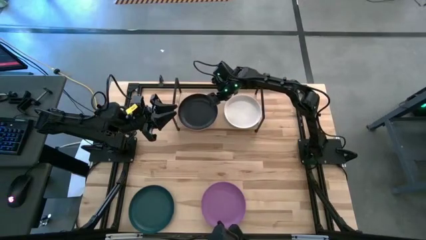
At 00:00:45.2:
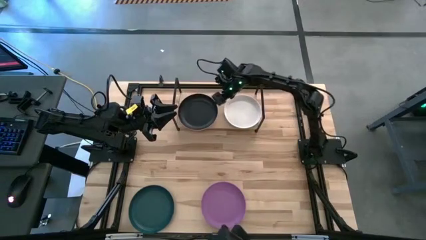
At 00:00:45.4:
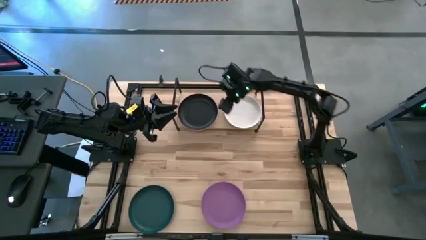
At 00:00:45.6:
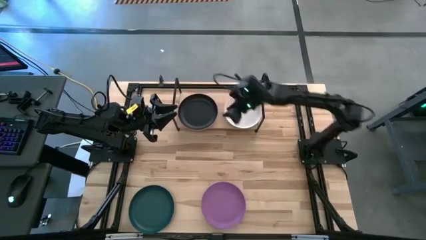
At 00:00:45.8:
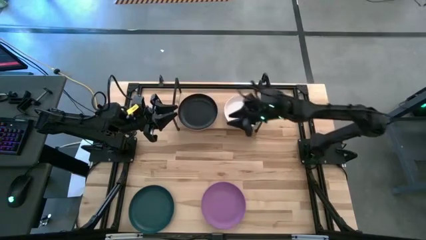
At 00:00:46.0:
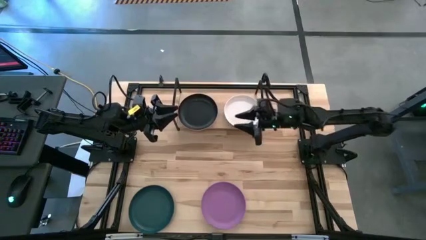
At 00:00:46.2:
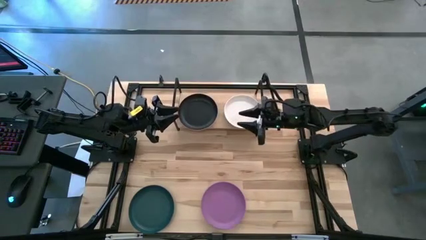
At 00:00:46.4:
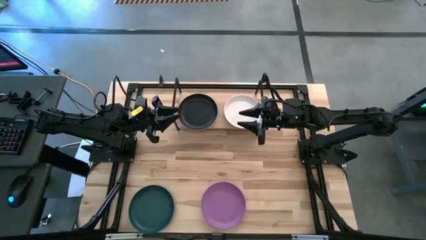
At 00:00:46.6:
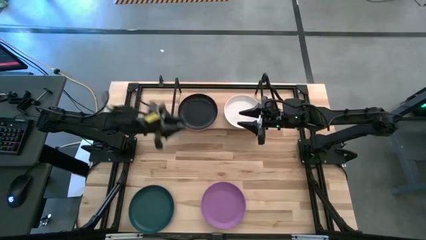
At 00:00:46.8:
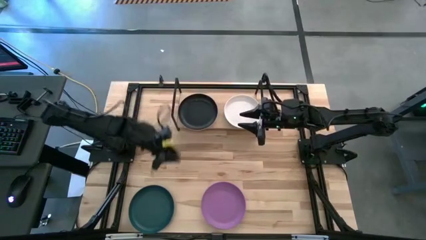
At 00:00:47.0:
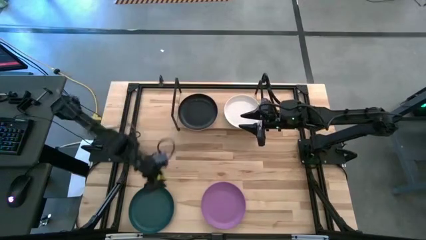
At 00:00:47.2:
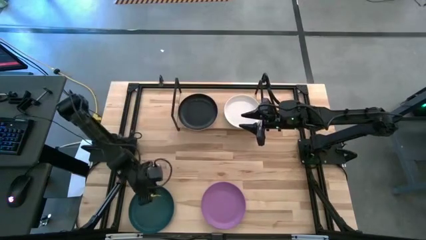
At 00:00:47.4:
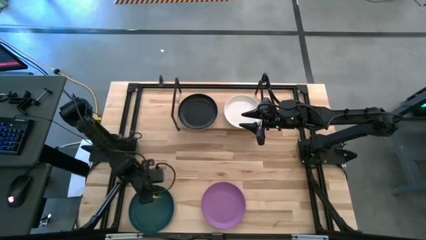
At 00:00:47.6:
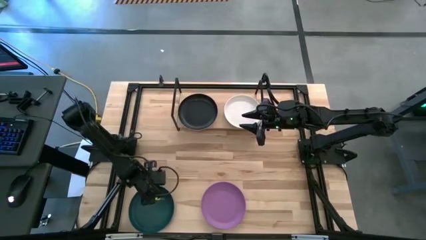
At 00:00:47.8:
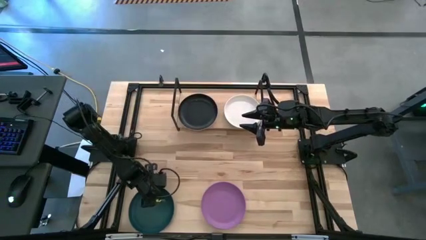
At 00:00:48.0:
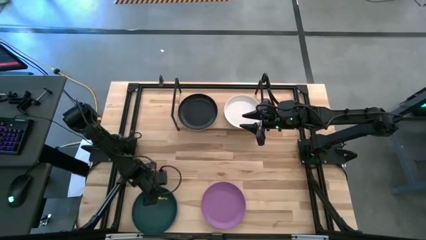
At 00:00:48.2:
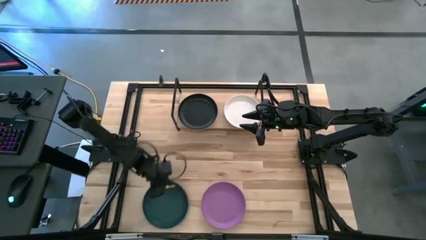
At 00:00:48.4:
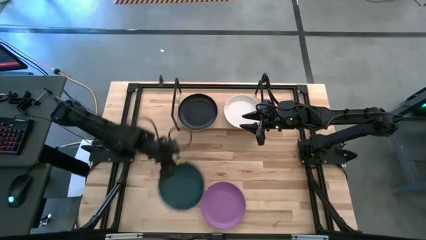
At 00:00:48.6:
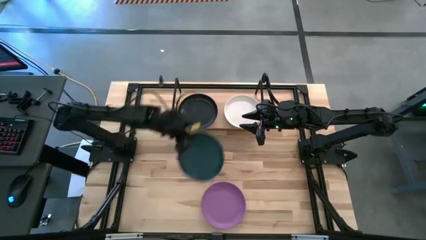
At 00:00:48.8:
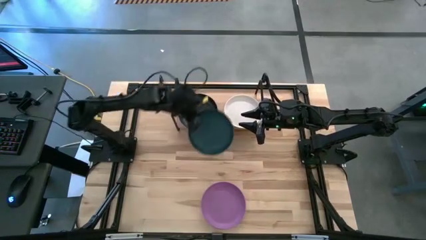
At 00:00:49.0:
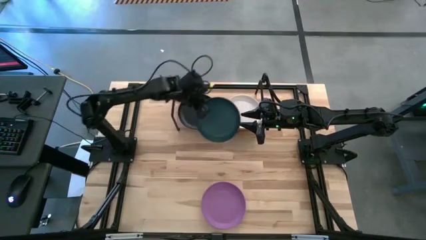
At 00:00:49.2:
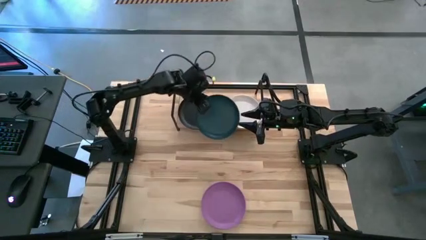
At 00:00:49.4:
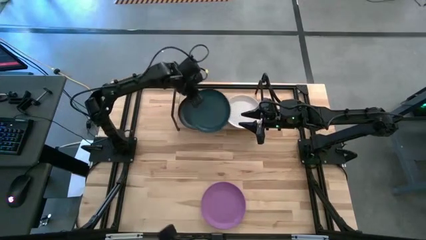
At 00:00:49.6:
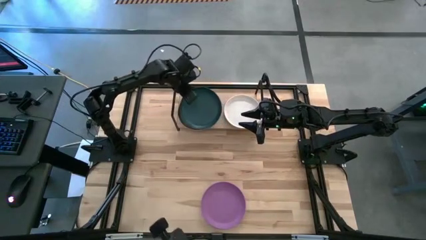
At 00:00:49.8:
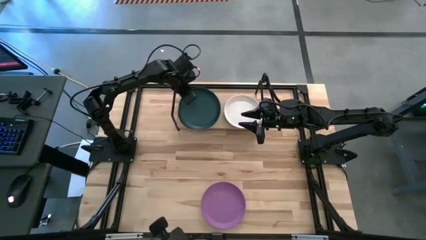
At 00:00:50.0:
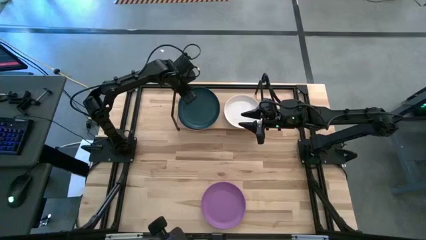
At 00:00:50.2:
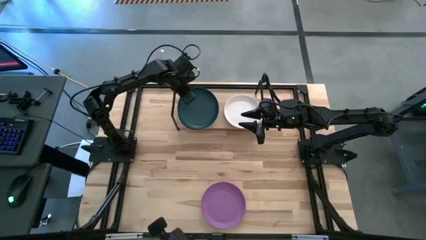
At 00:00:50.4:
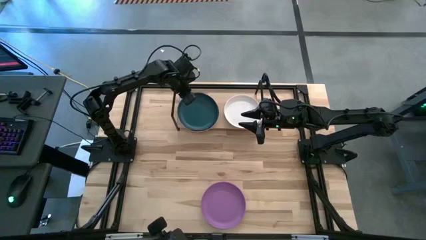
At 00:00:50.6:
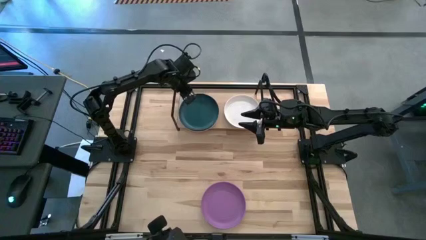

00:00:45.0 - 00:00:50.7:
Task: Place and stack plates onto a shelf
Stack the green plate on top of the black plate on the shelf

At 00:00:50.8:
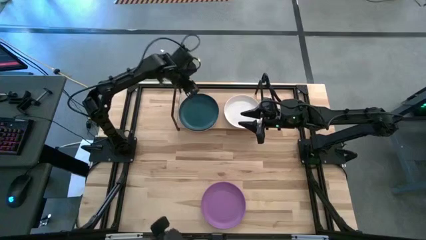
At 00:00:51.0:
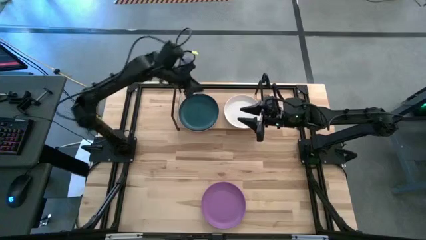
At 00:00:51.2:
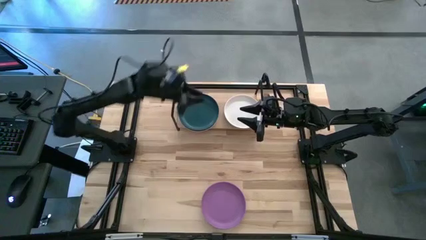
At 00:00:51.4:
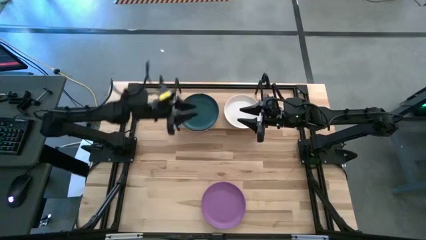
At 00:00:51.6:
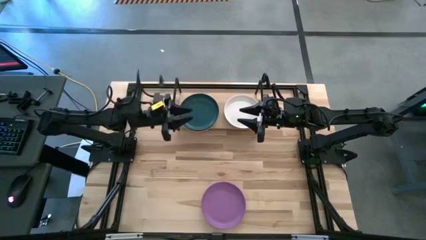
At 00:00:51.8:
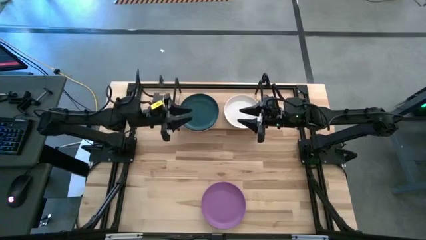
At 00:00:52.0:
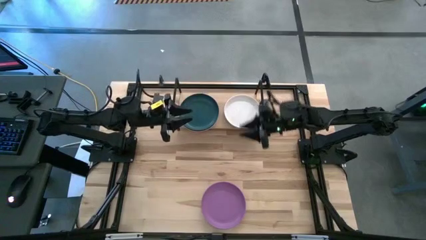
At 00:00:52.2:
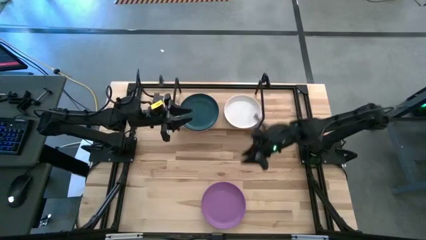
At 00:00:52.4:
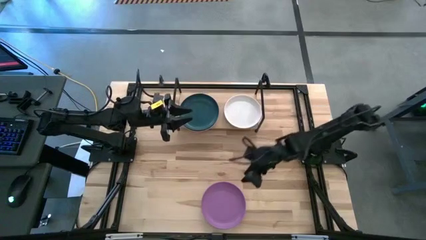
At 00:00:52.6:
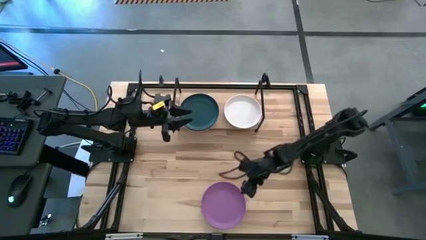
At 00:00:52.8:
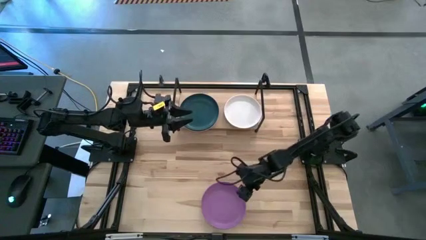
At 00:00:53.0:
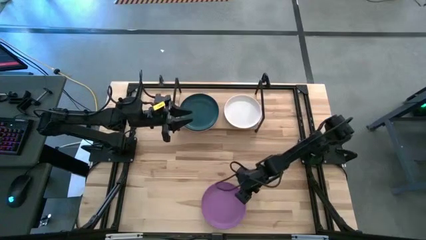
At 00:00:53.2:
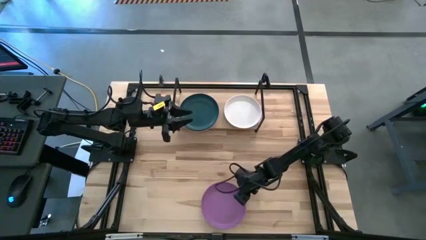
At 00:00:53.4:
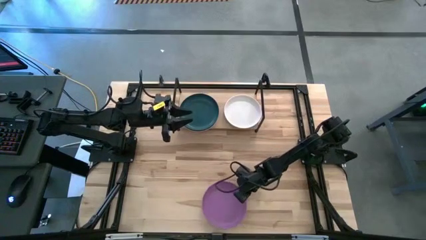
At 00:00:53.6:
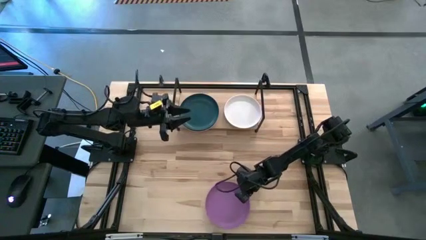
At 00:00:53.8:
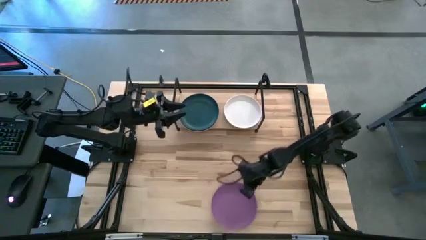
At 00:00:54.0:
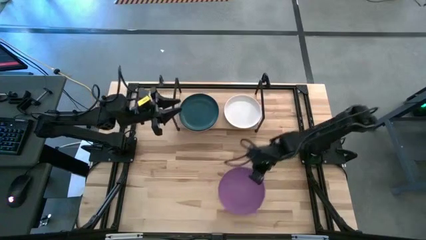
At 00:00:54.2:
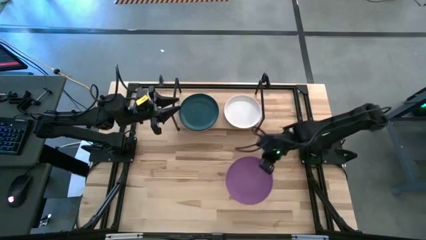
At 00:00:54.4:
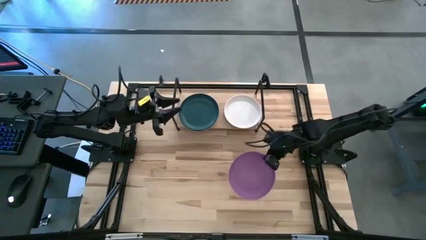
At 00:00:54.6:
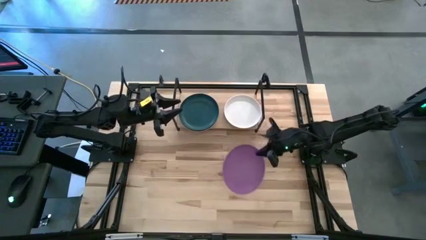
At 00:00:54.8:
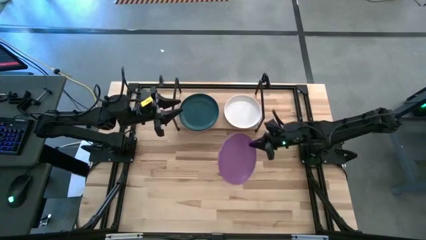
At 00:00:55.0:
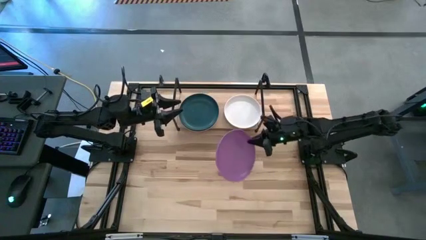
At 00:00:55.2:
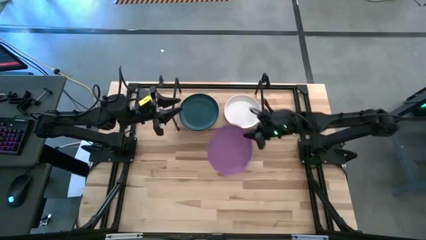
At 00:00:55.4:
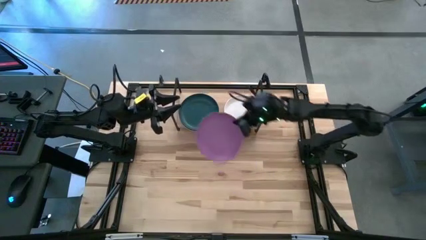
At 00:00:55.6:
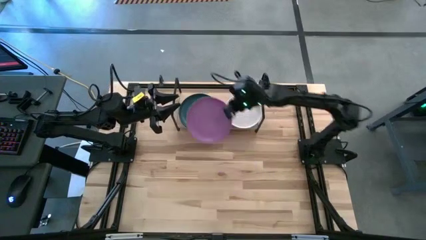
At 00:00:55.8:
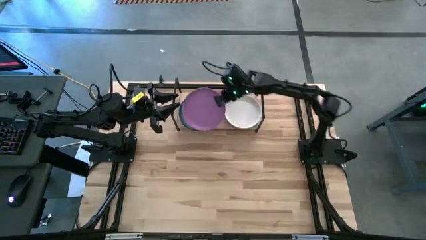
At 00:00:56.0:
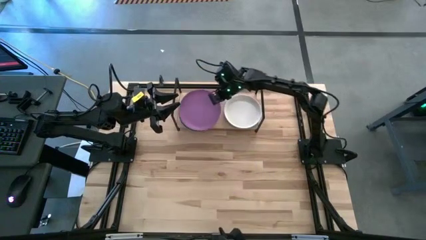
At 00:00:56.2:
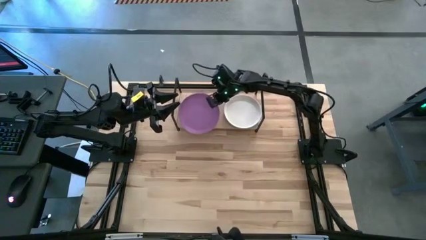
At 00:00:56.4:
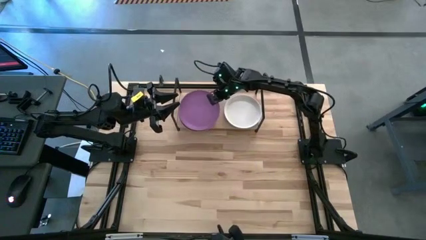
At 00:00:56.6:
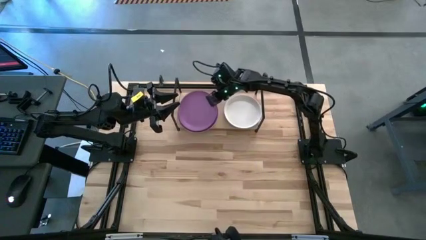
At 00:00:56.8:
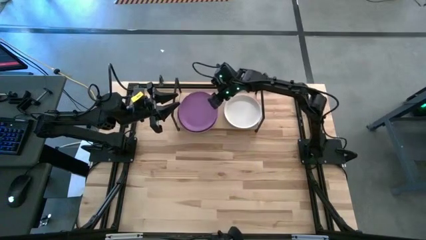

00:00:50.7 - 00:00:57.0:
Stack the purple plate on top of the dark green plate on the shelf

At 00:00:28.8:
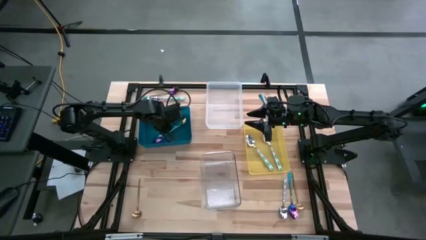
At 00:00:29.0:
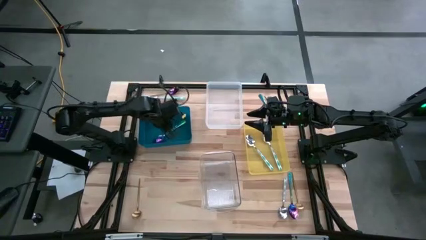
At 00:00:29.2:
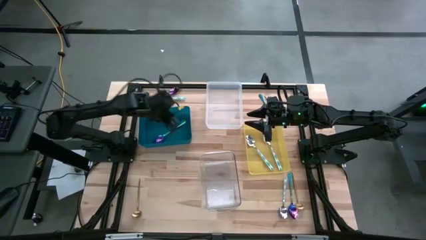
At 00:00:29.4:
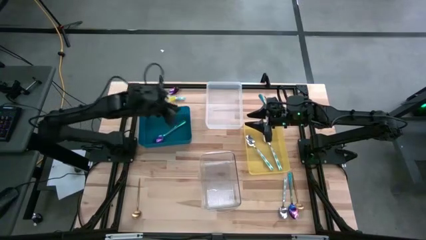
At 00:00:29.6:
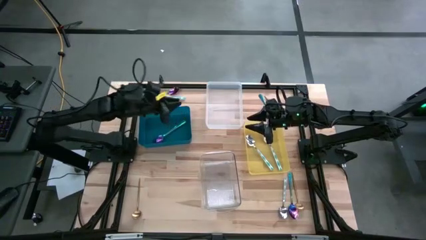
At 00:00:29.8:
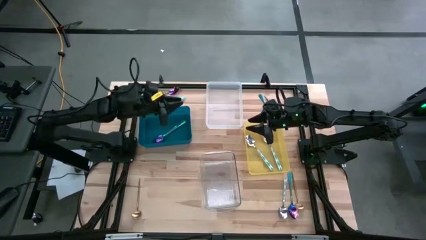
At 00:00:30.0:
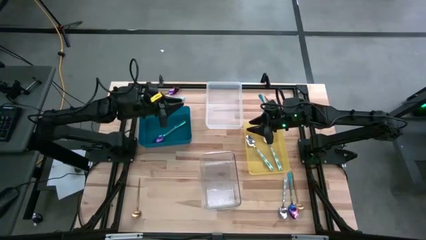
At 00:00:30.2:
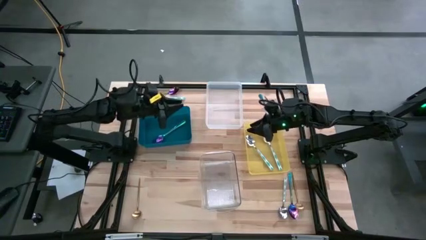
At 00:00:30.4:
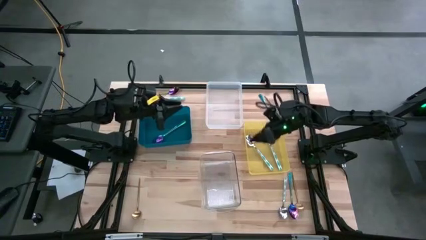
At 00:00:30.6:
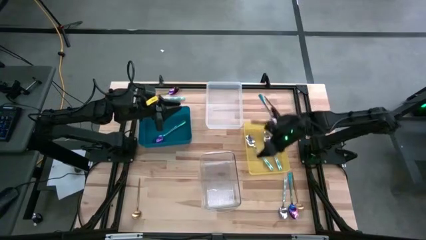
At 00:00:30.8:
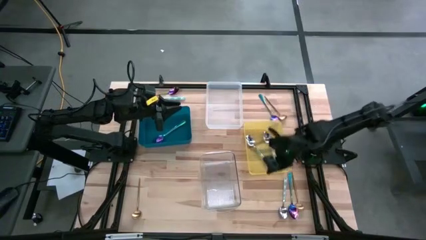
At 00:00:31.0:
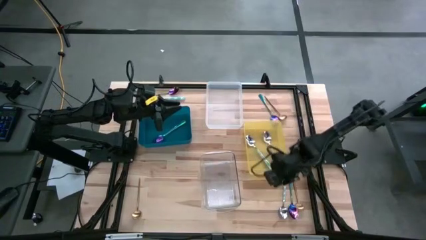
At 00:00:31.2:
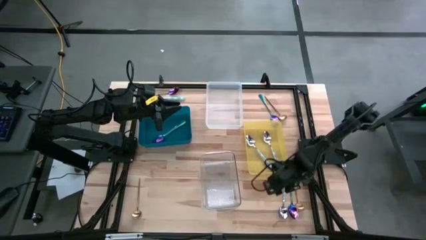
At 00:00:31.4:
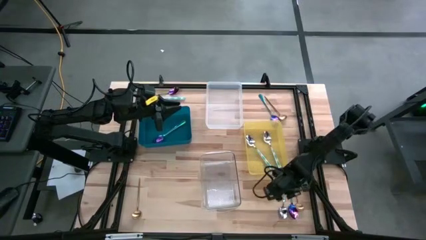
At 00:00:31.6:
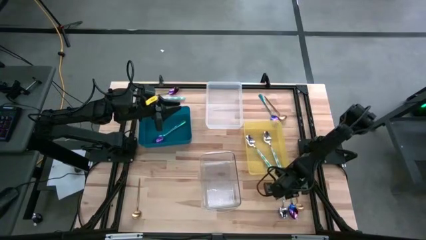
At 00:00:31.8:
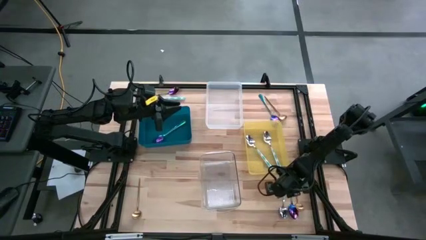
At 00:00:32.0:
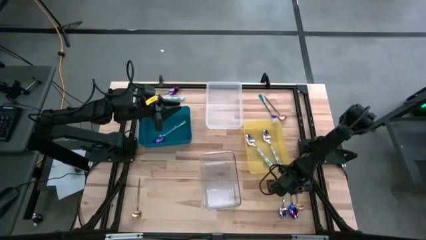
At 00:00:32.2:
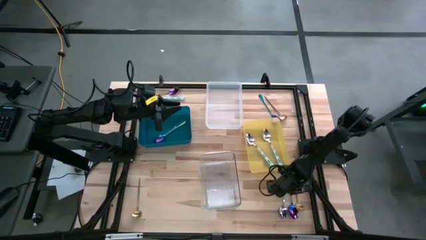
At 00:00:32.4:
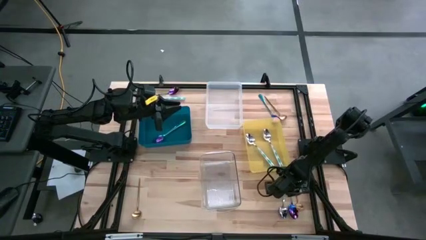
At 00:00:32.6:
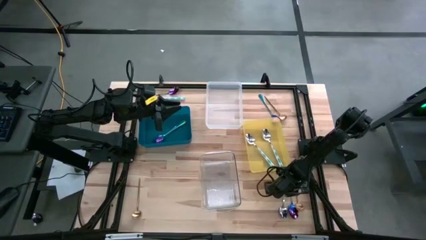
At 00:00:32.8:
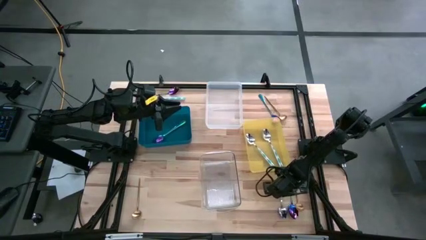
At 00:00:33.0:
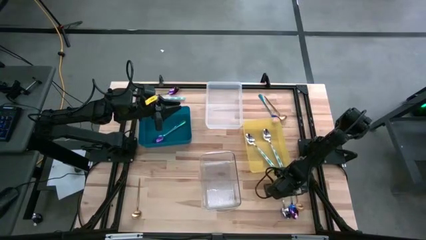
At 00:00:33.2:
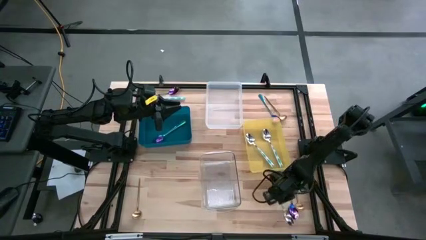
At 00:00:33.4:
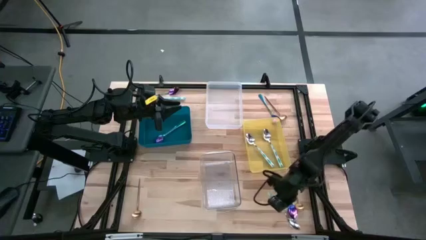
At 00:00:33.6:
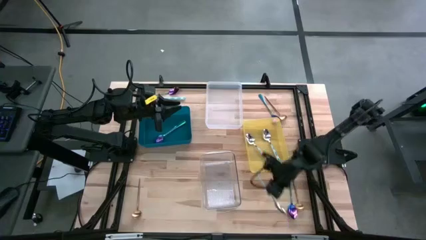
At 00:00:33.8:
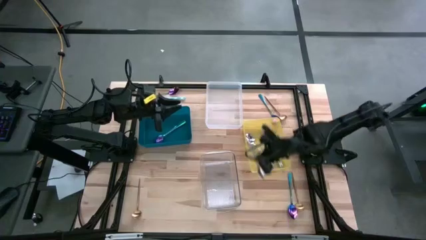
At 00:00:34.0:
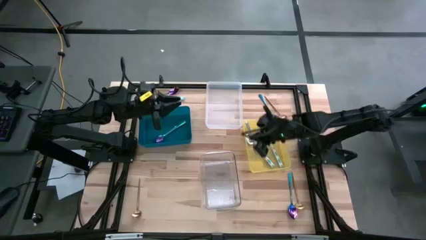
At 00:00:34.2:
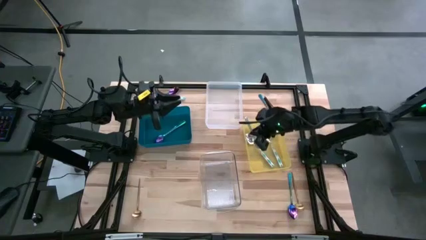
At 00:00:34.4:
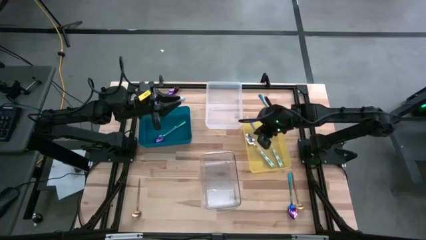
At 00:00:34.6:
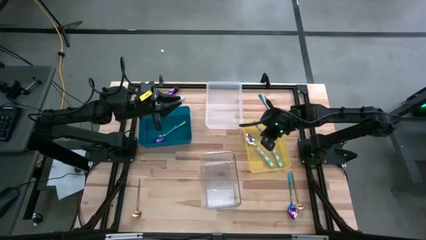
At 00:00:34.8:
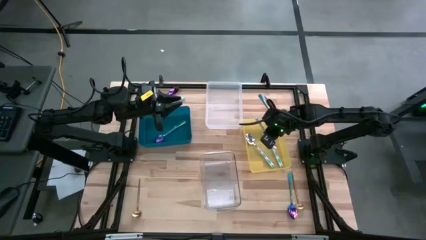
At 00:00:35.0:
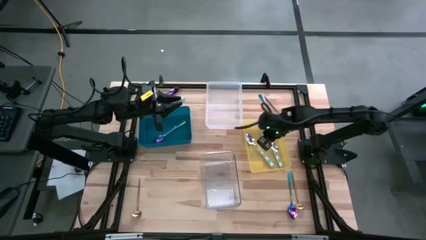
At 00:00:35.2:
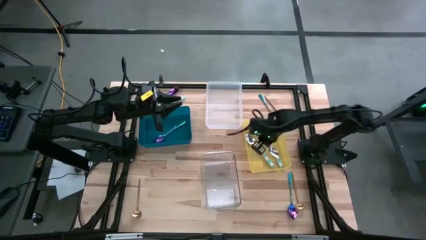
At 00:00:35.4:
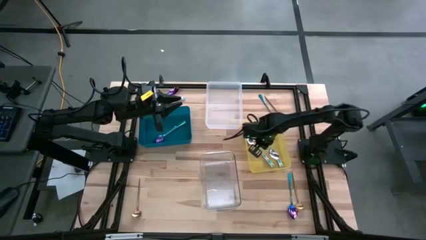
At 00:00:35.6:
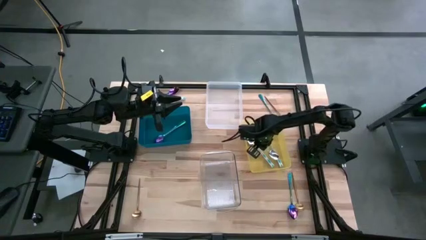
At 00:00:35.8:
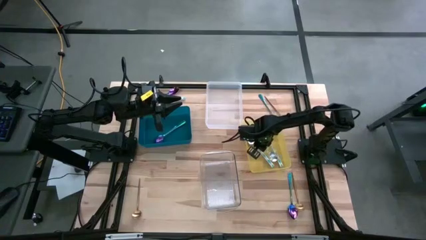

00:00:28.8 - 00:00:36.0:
Task: Sort silverware by color (type)
Put the white spoon into the yellow bin
